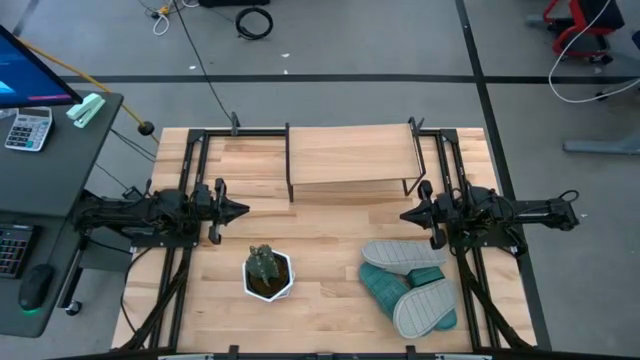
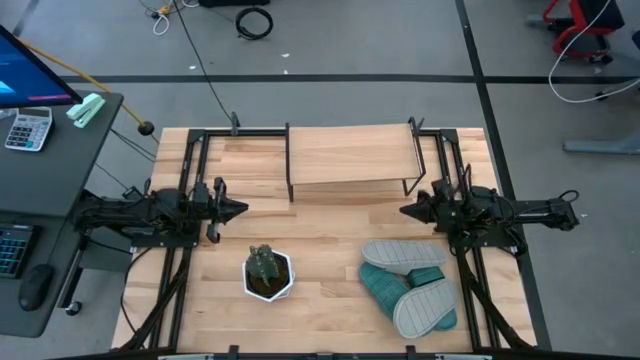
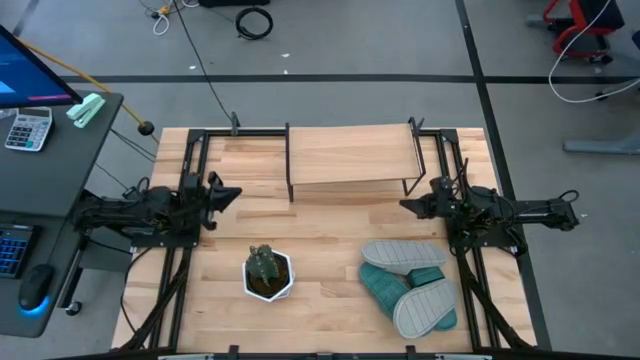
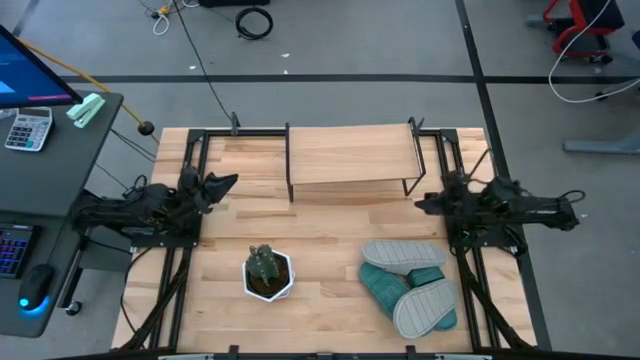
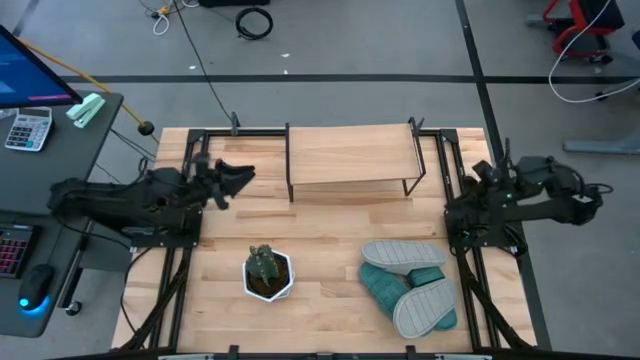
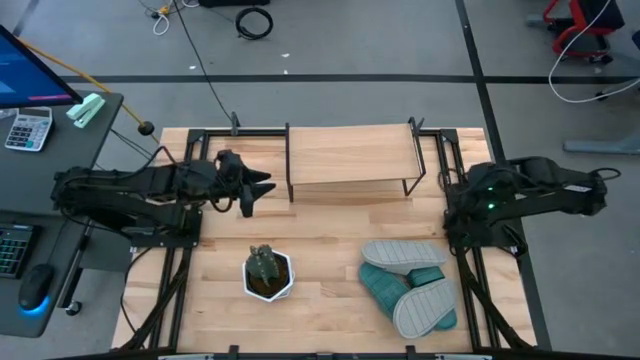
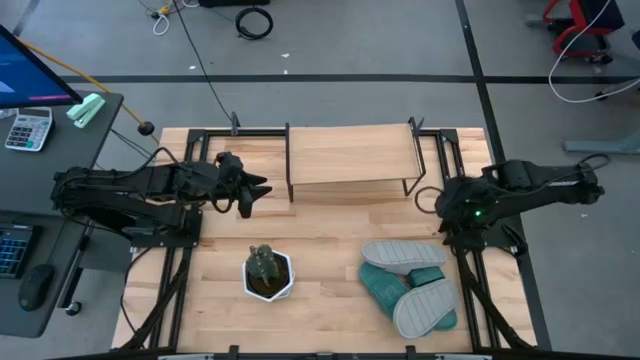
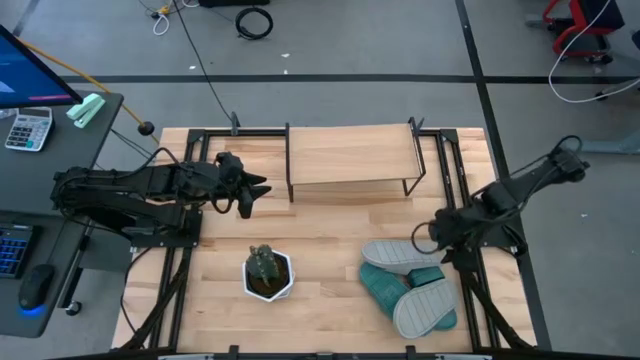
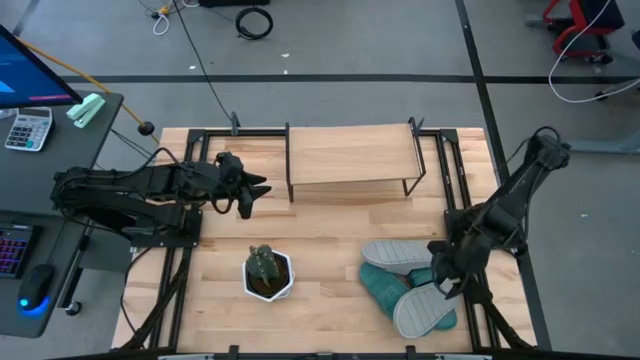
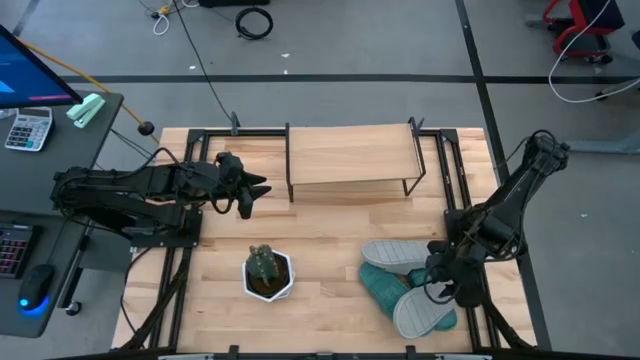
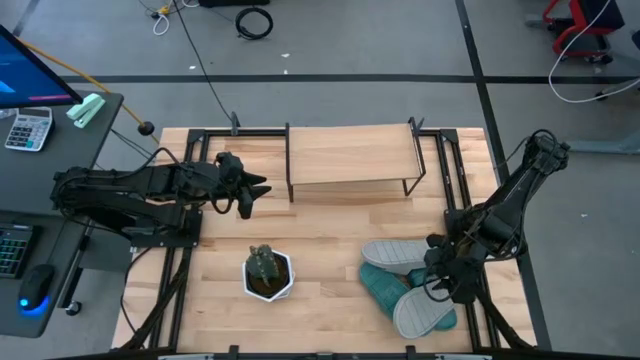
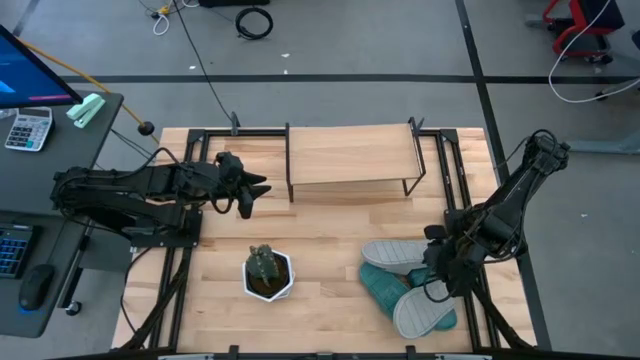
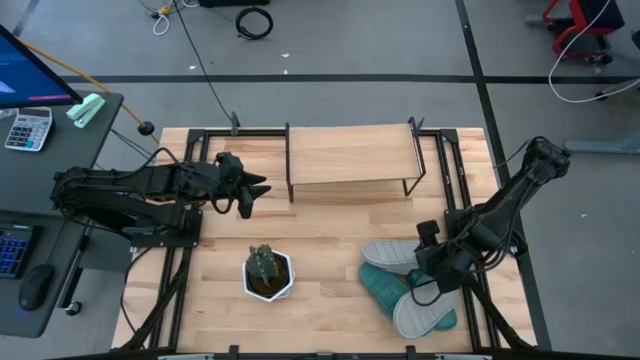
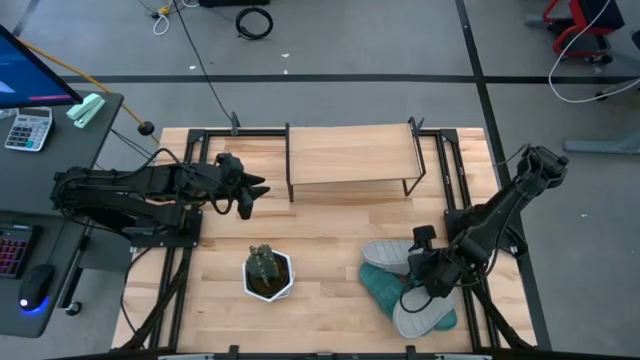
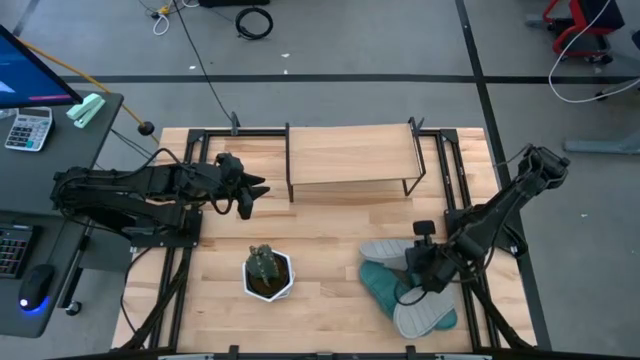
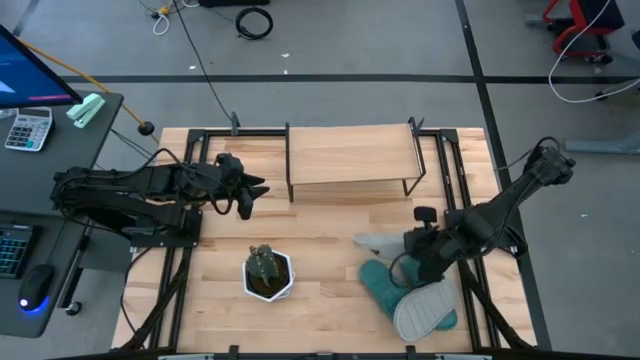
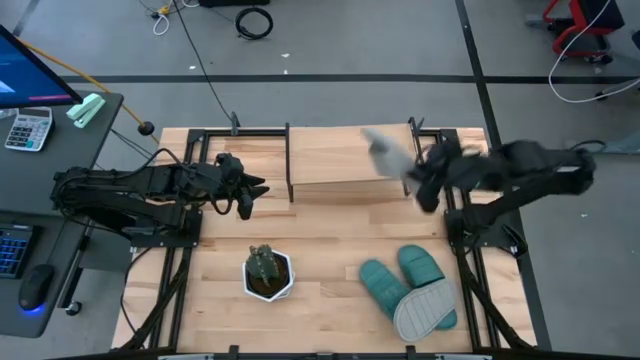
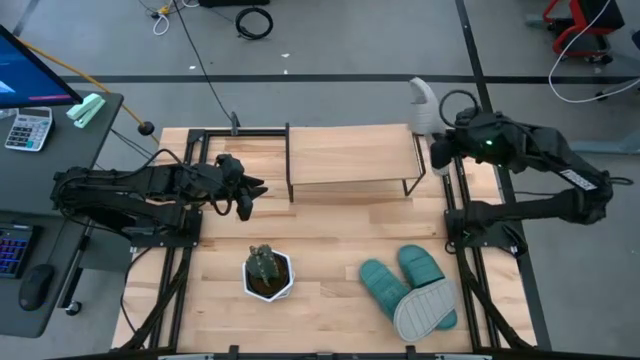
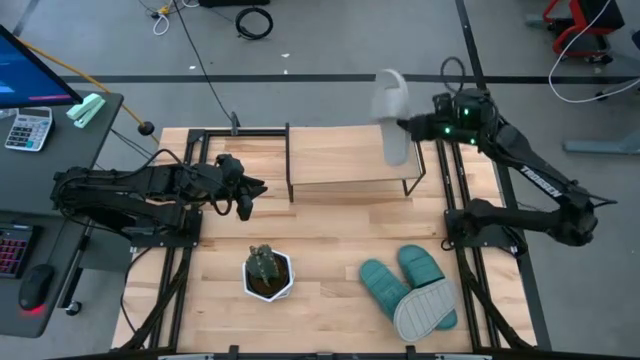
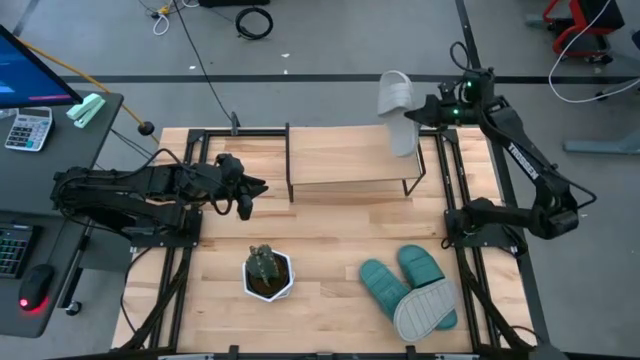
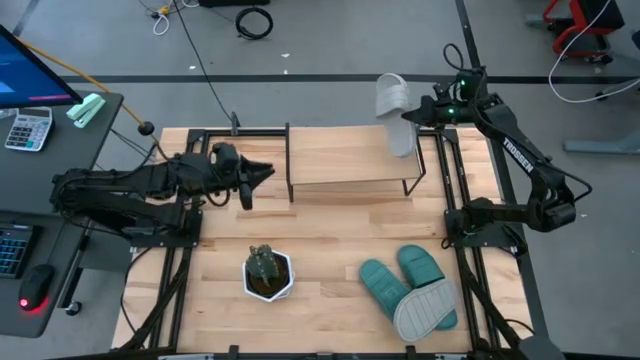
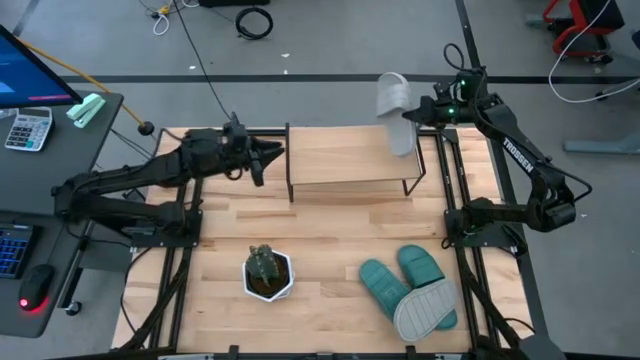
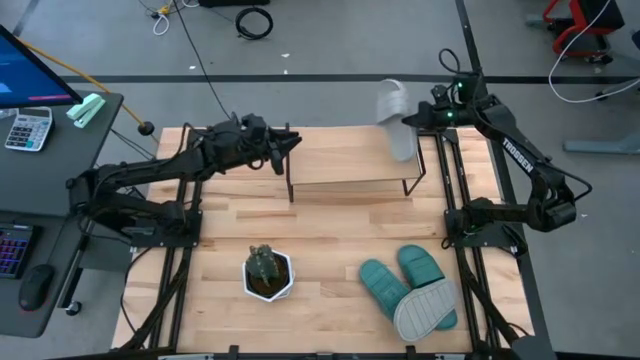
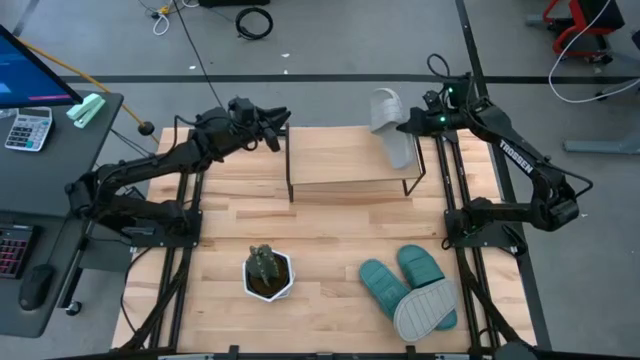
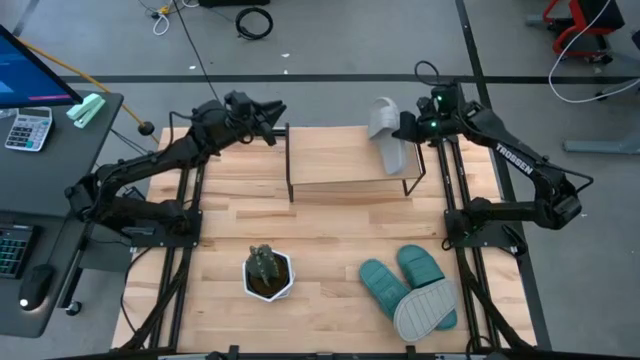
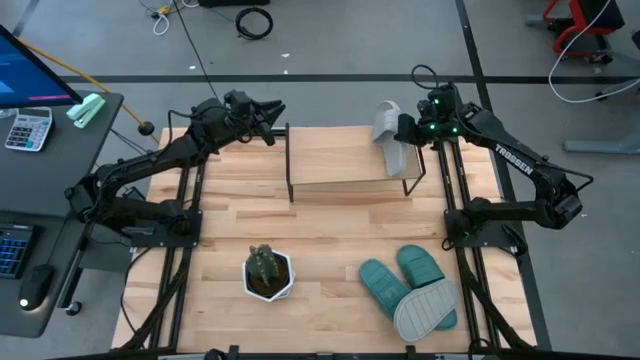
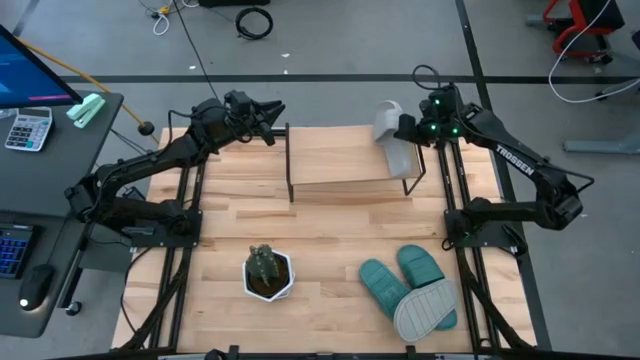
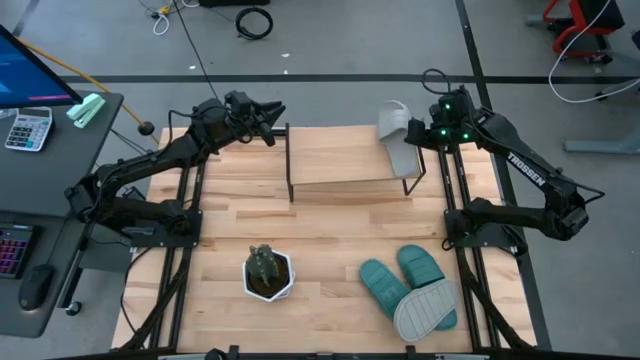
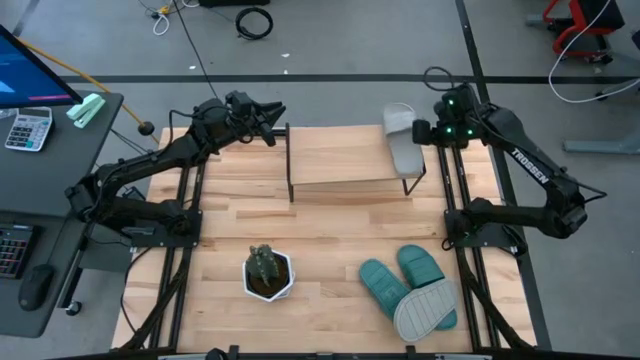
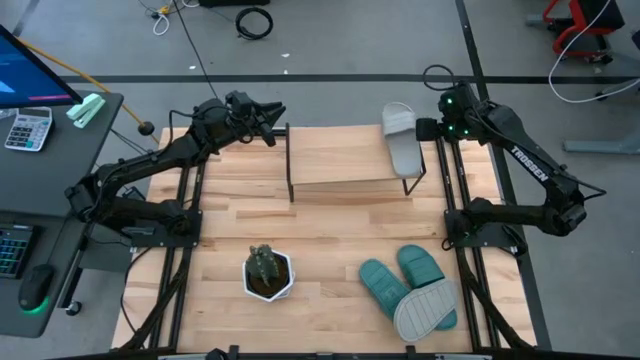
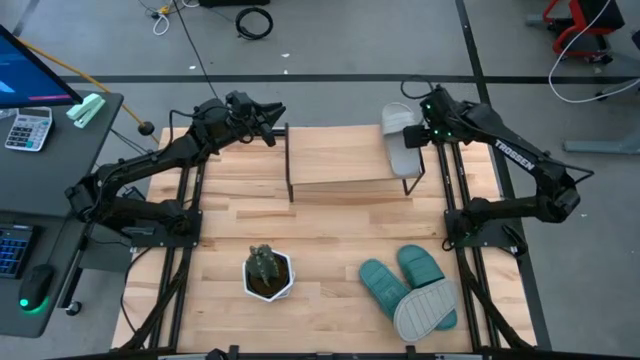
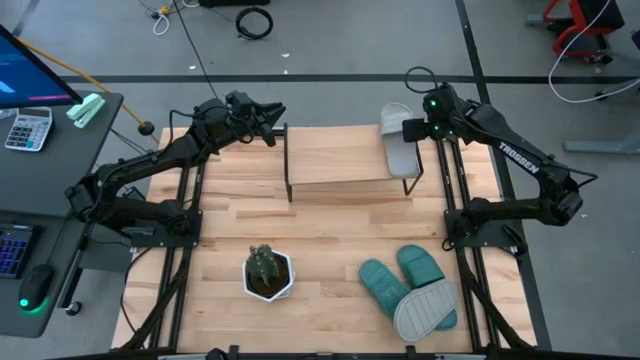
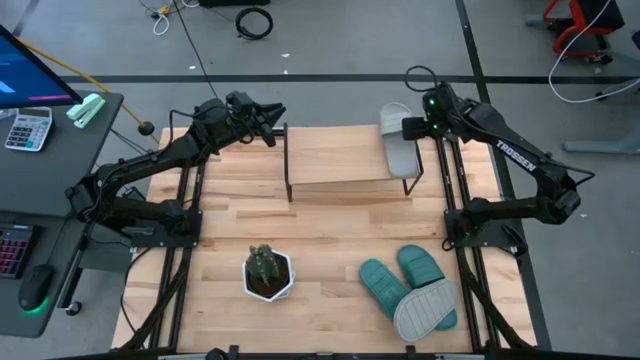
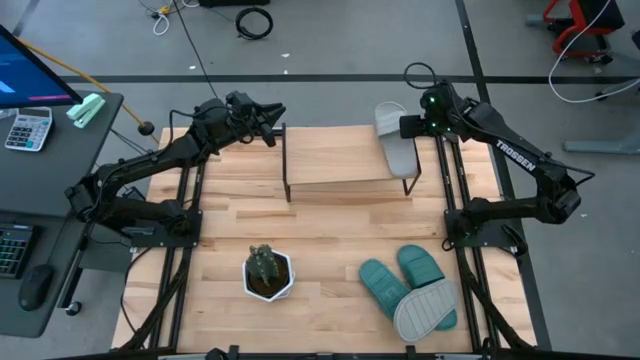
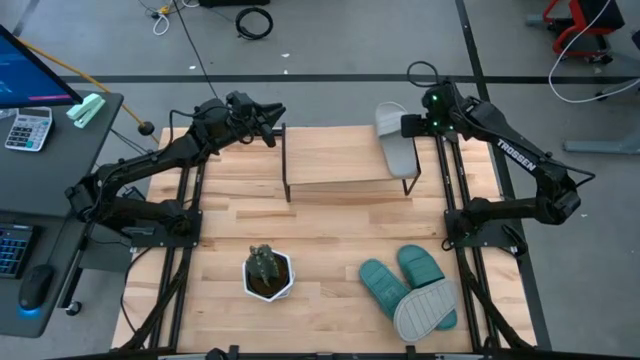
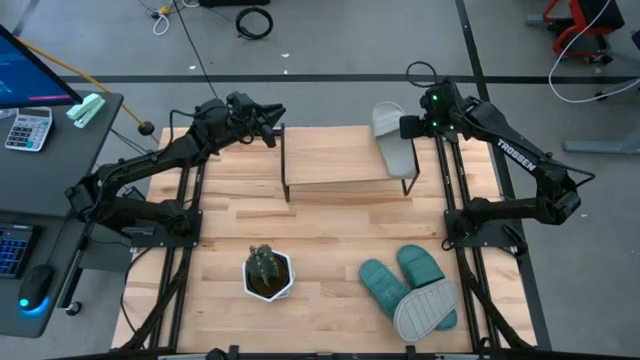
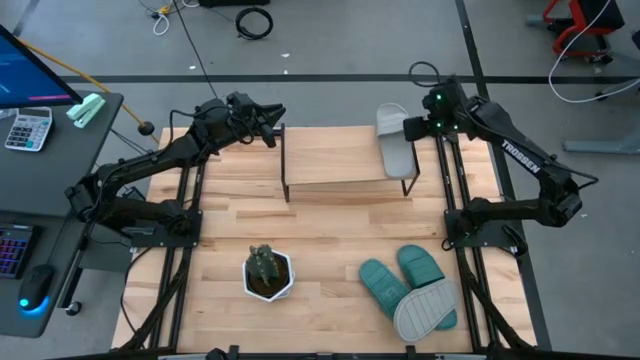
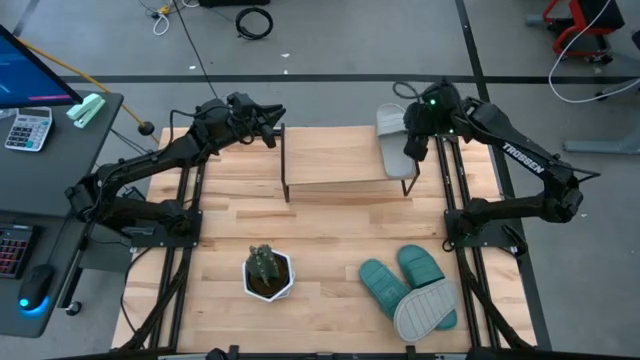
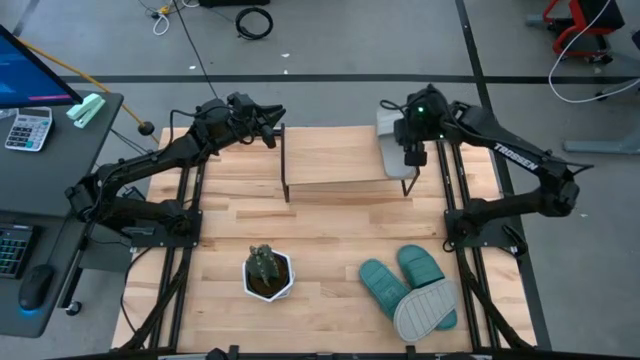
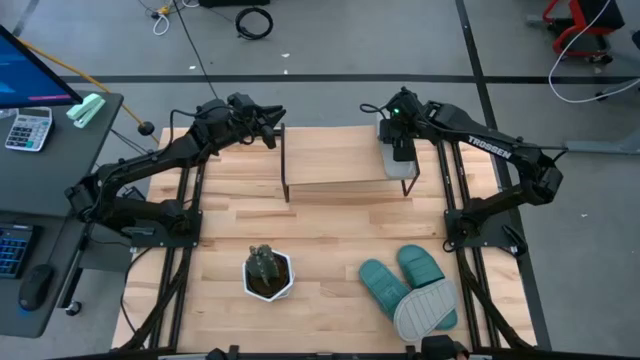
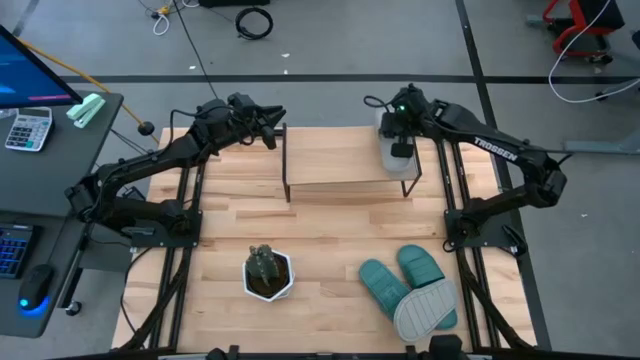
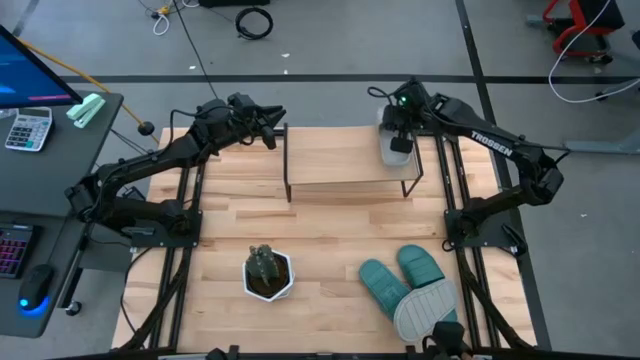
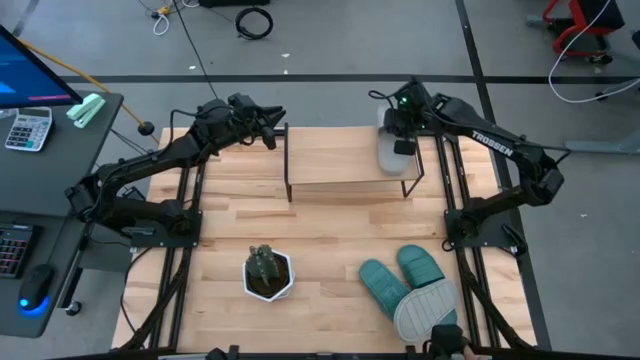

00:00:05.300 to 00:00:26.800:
Task: Pick and place slides into the shelf
Put the top gray slide on the shelf
